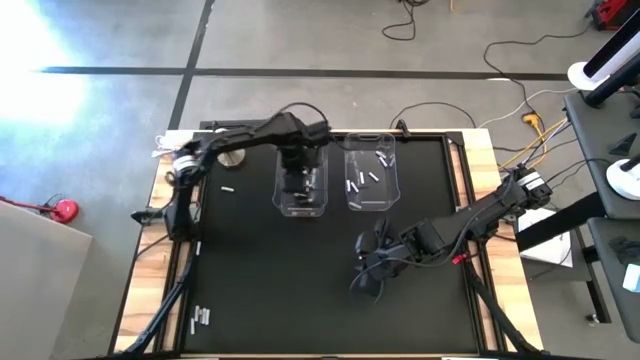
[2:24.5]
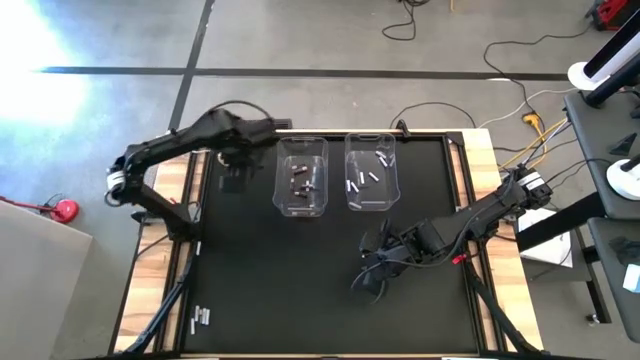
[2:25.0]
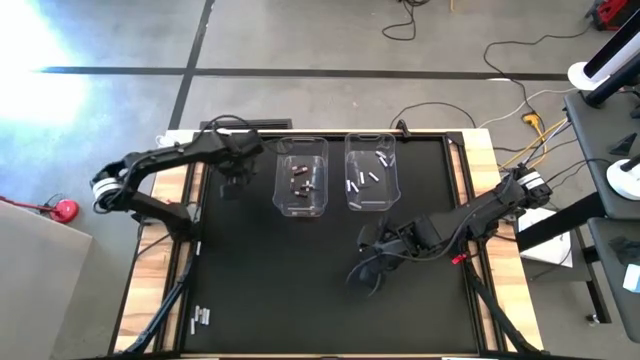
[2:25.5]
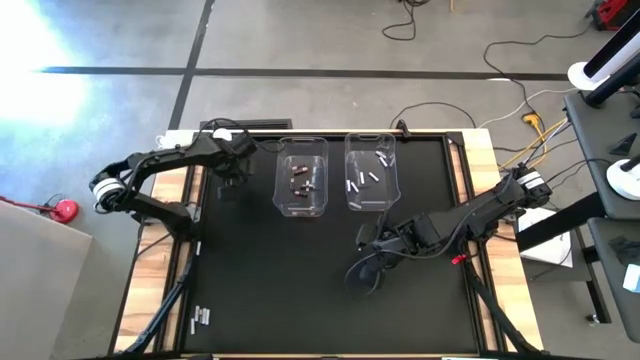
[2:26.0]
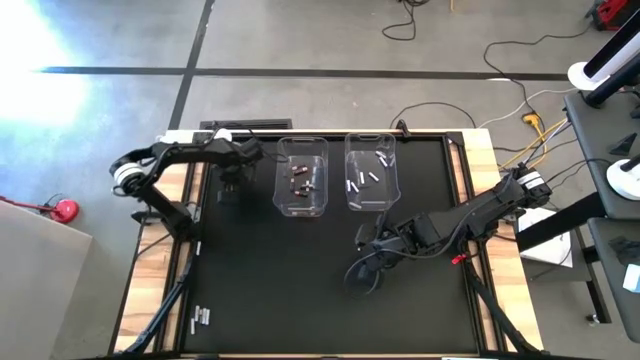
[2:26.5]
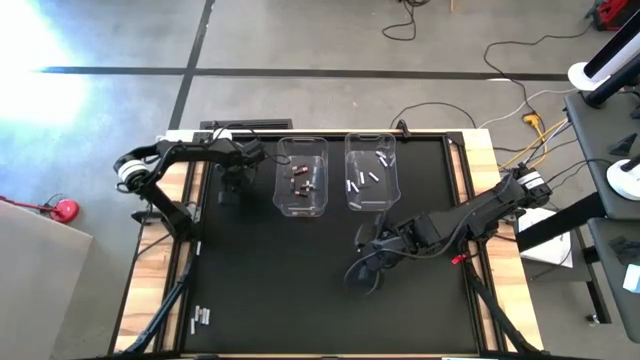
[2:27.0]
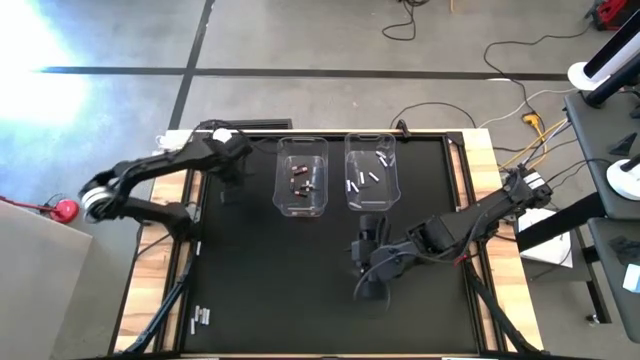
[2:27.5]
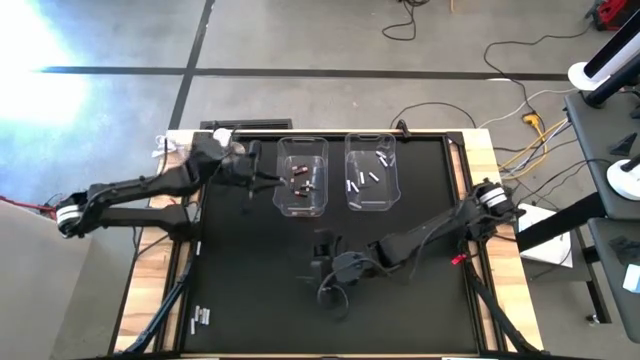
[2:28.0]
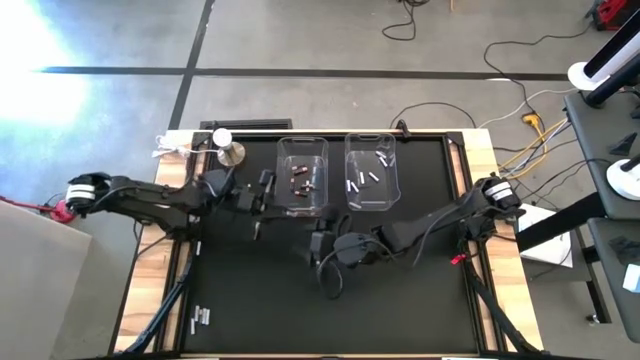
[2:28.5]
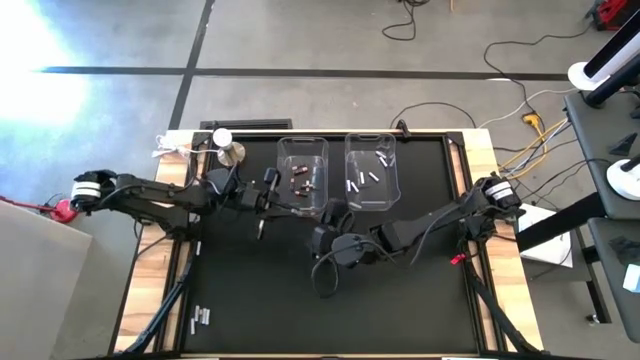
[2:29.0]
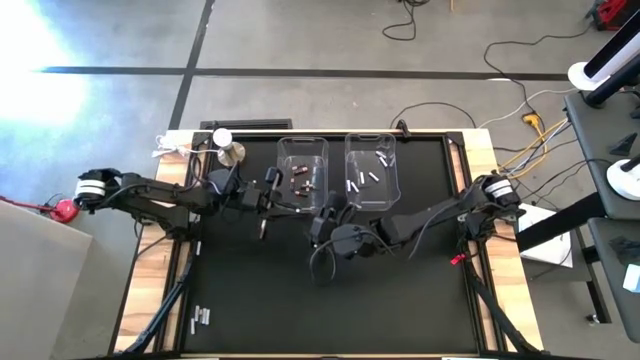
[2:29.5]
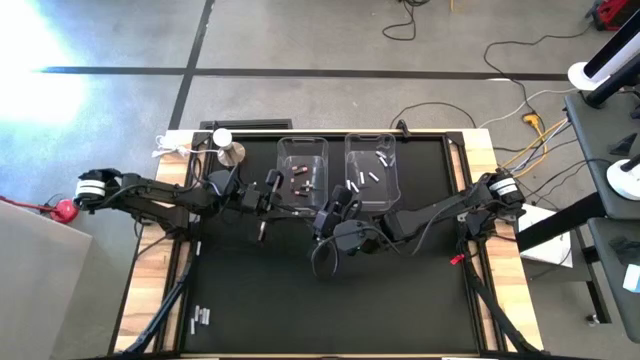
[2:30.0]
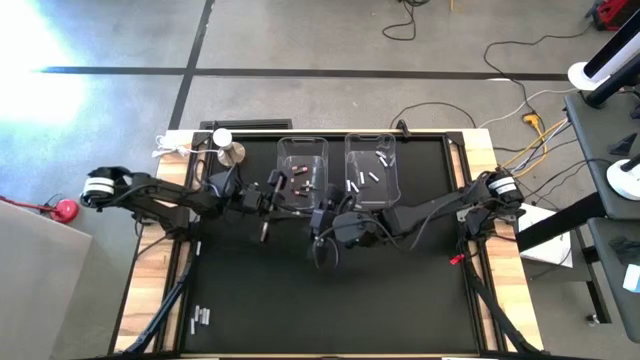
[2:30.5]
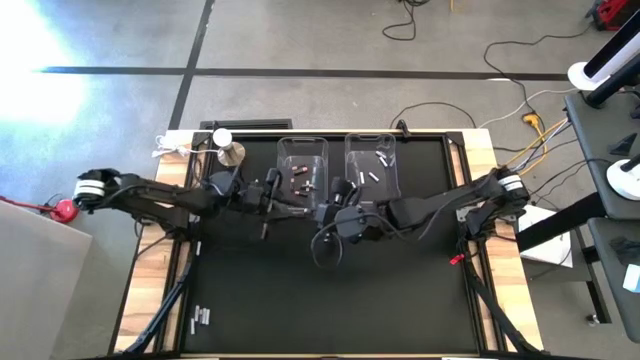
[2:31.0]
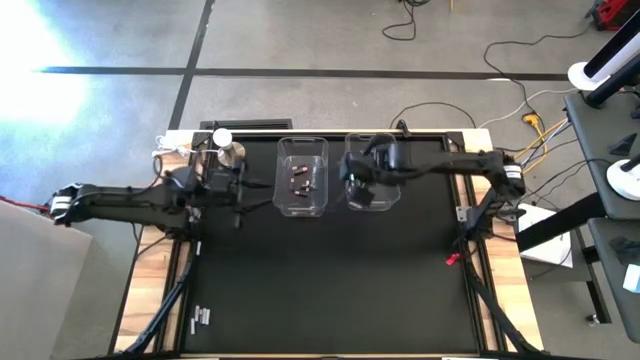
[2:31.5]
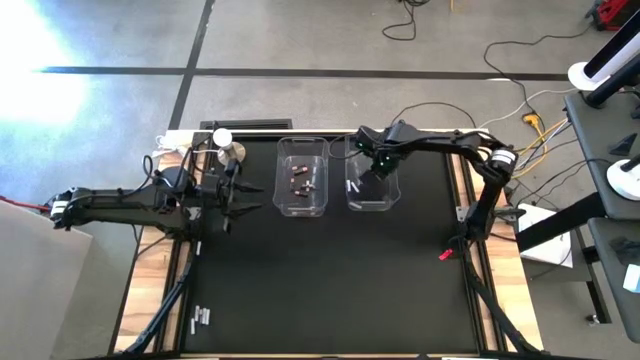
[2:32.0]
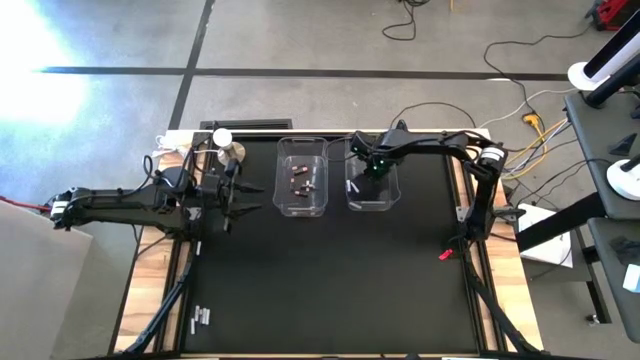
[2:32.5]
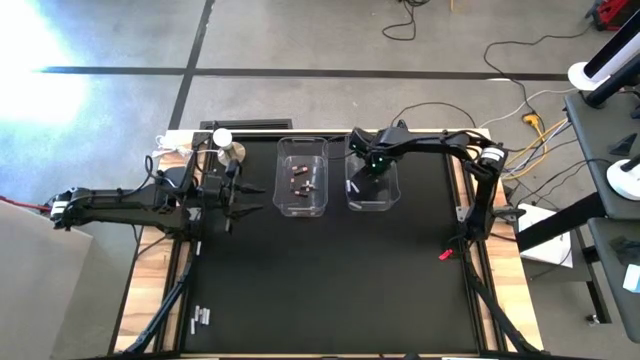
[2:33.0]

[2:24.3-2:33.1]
Task: Sort batteries
Put the white battery into the right transparent bin

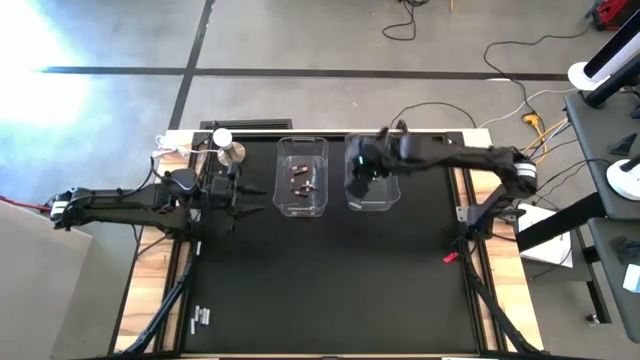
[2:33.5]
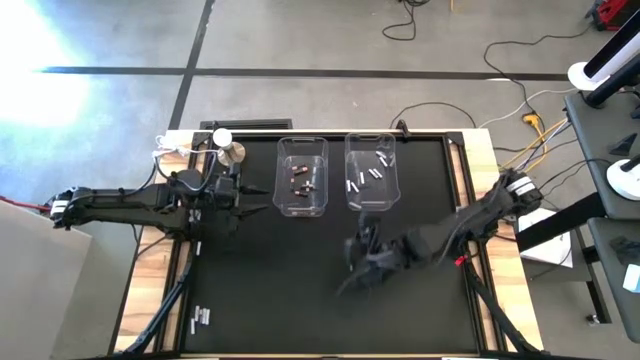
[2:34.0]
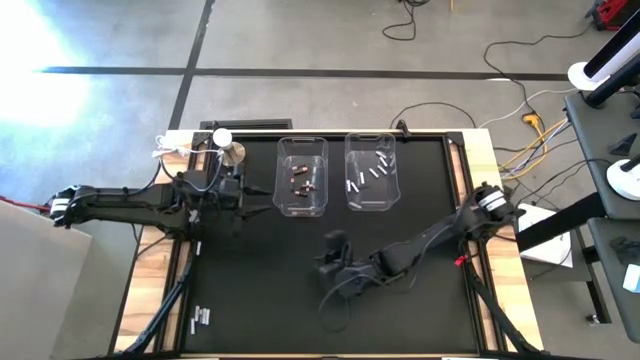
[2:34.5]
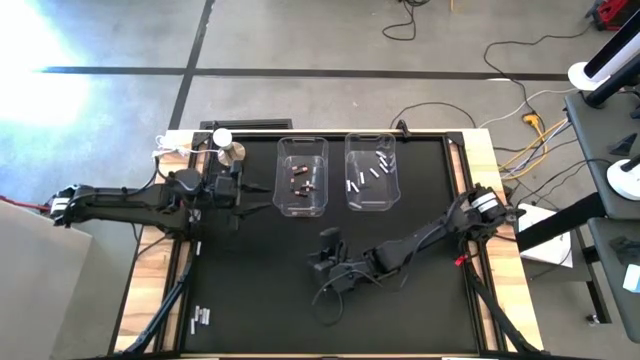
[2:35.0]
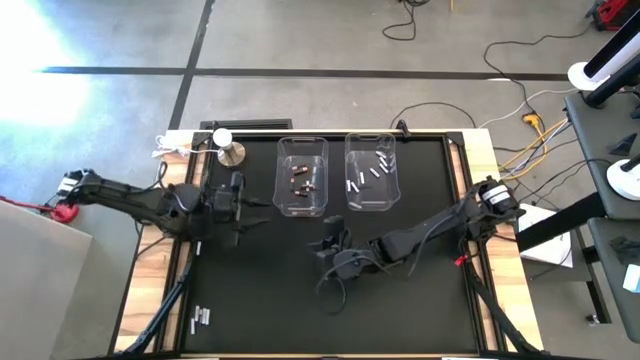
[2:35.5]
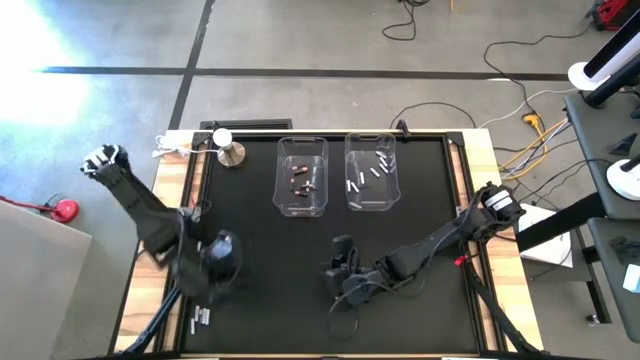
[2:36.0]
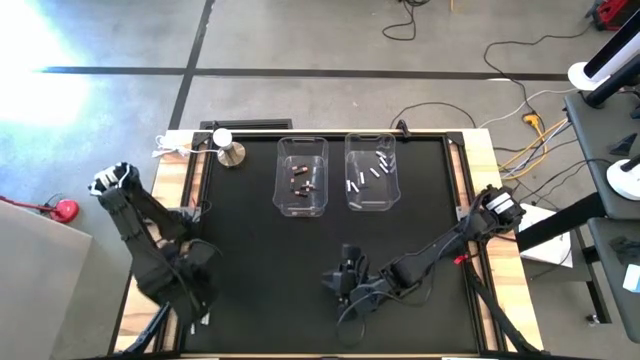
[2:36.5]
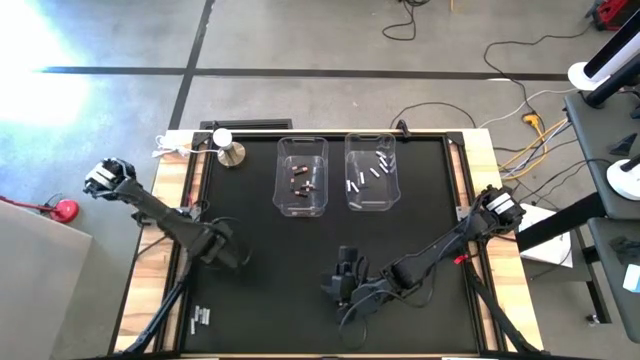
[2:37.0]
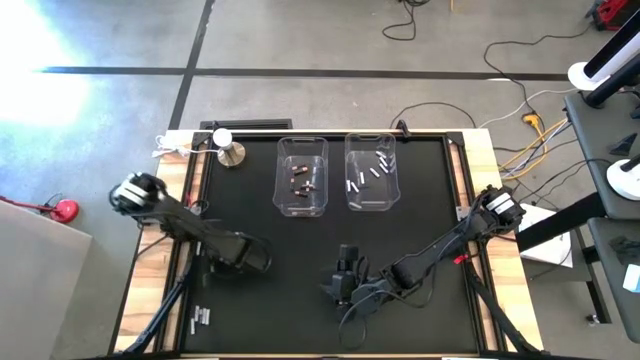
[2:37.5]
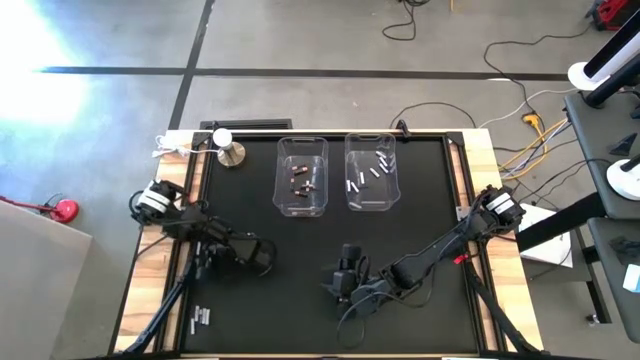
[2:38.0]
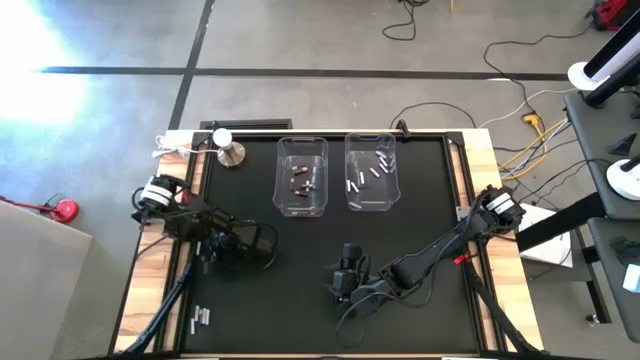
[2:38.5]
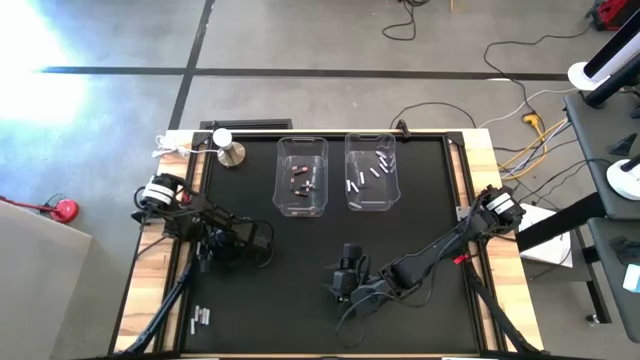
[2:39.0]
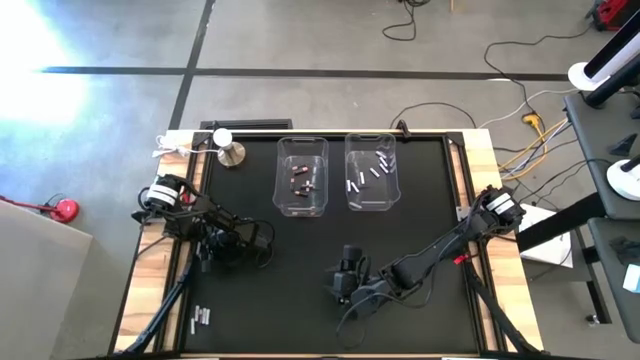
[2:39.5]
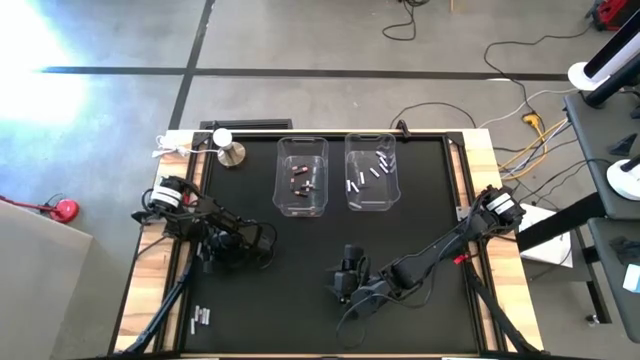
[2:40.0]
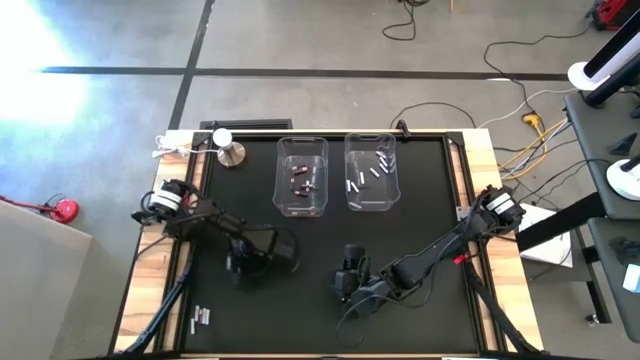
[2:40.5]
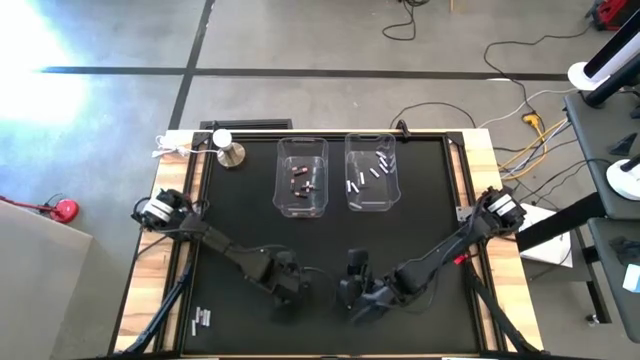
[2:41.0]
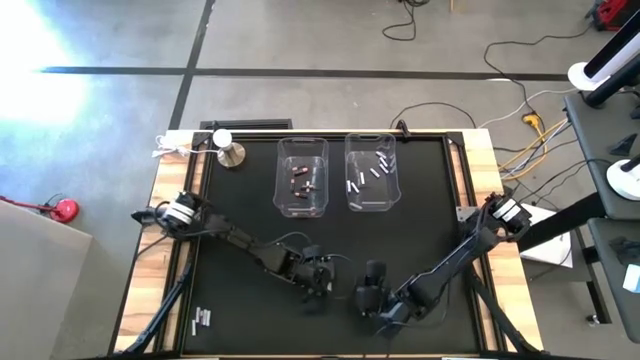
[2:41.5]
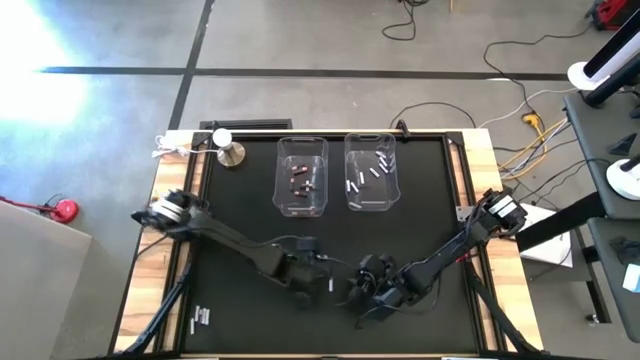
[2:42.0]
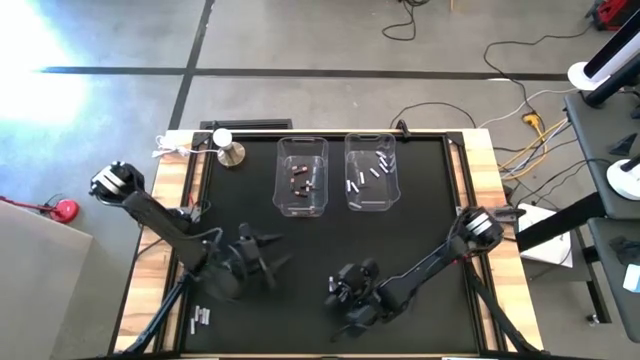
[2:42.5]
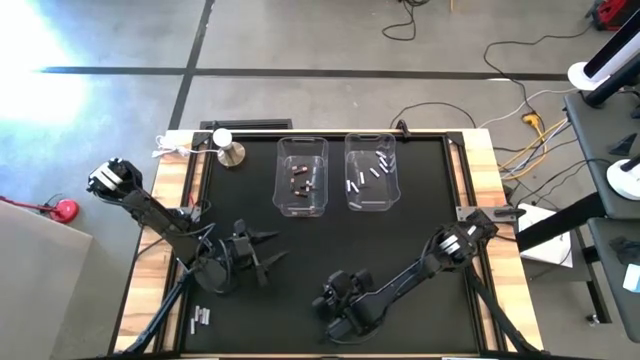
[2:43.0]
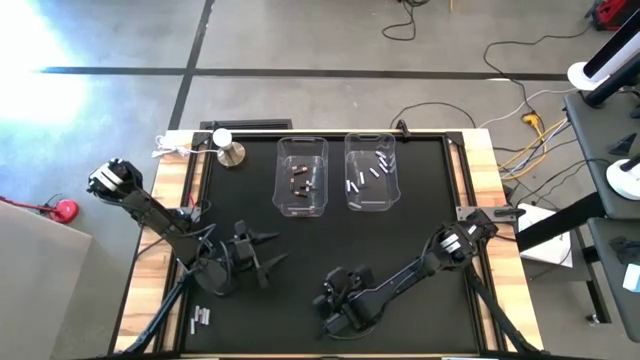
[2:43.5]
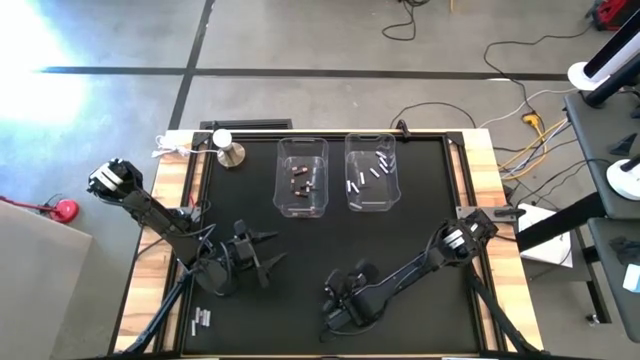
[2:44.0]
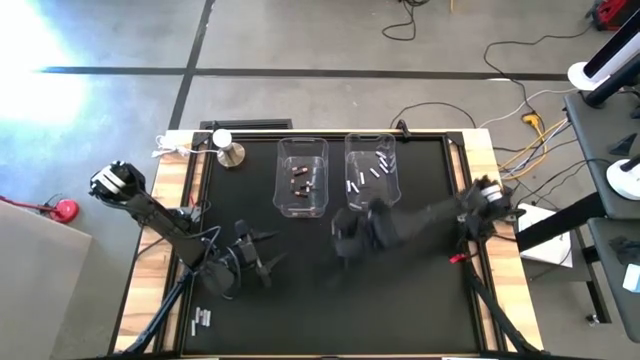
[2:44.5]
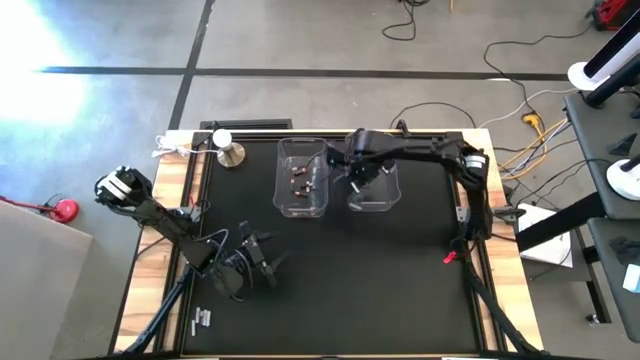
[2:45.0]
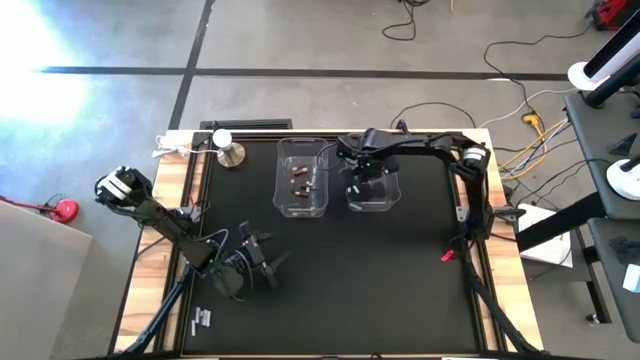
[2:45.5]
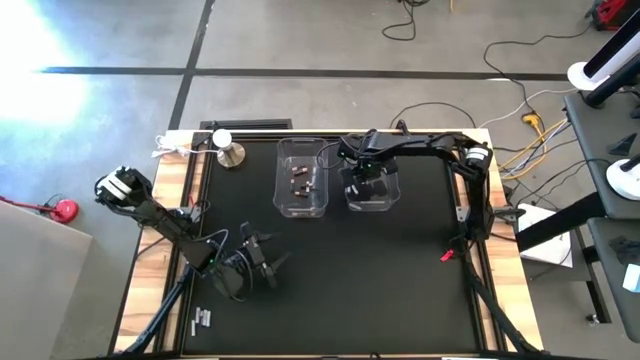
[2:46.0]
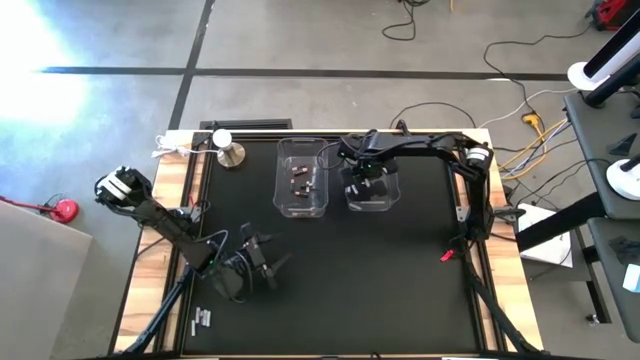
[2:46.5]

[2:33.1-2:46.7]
Put the white battery into the right transparent bin
